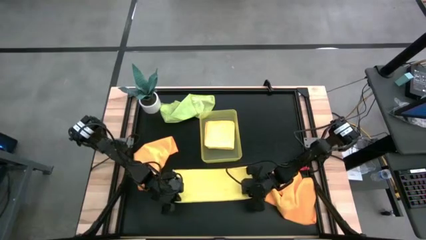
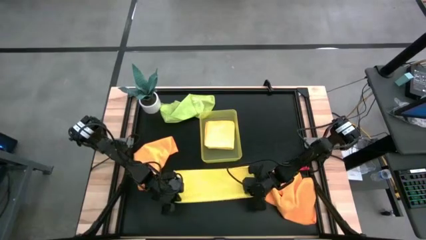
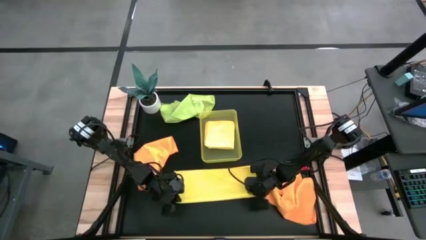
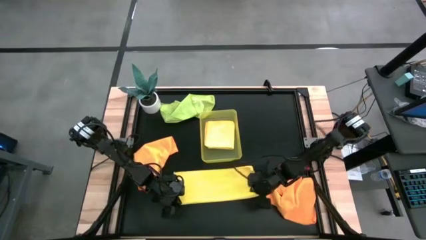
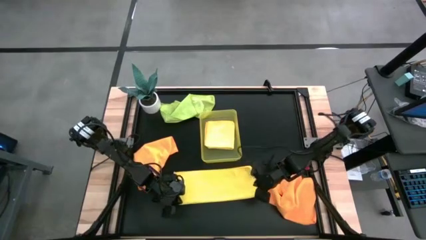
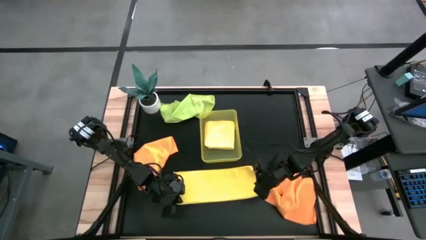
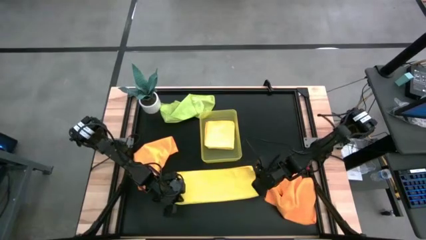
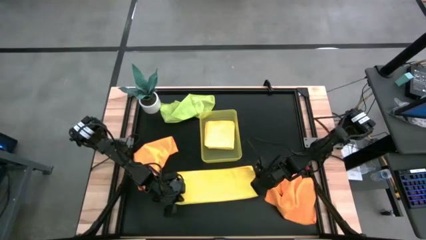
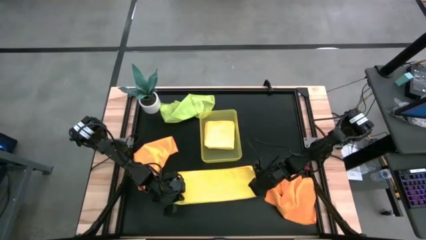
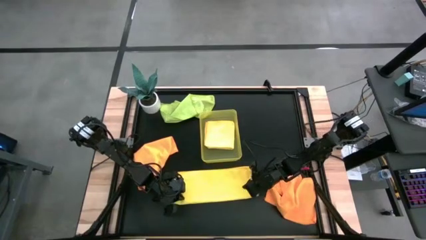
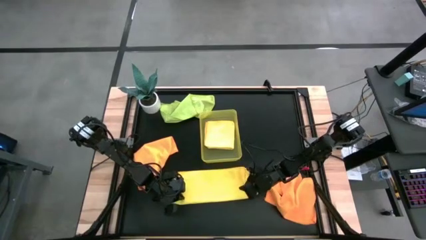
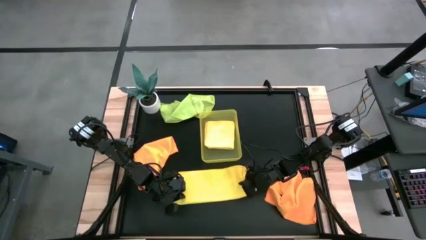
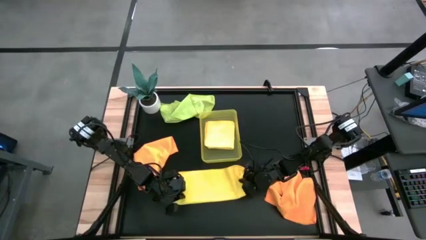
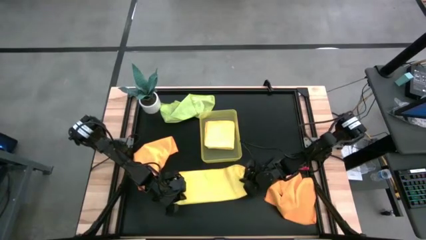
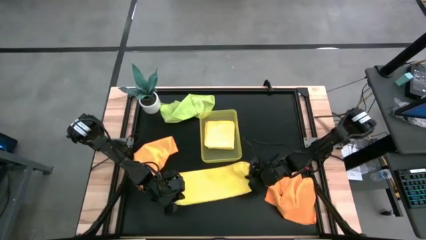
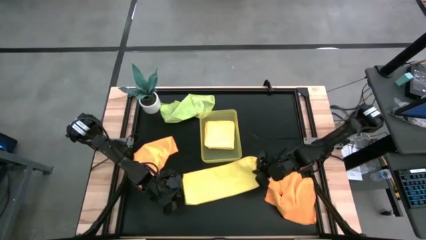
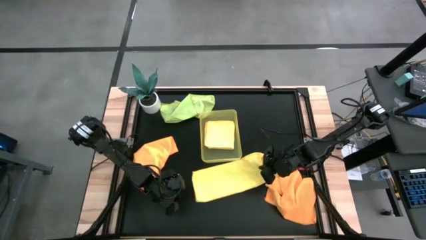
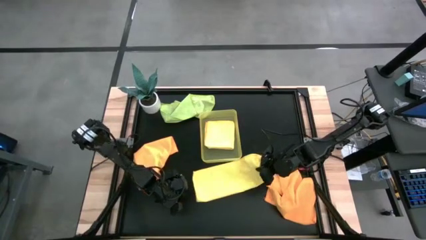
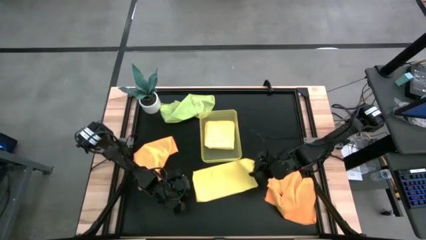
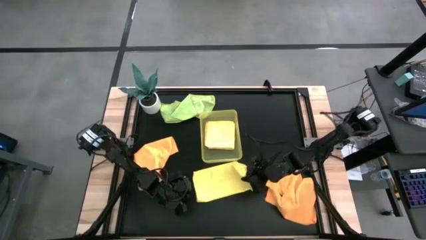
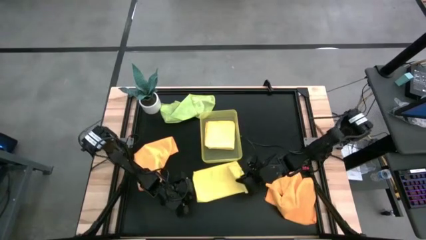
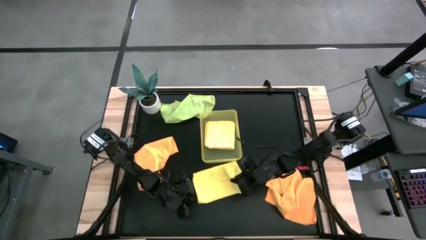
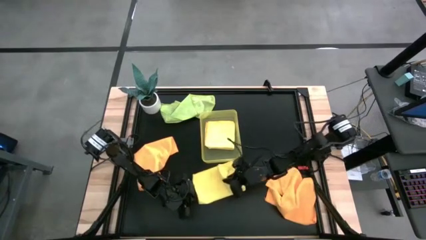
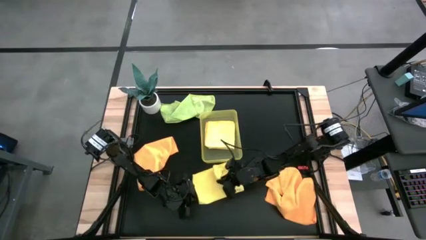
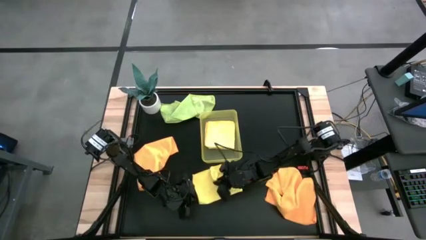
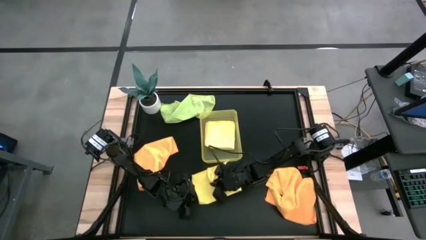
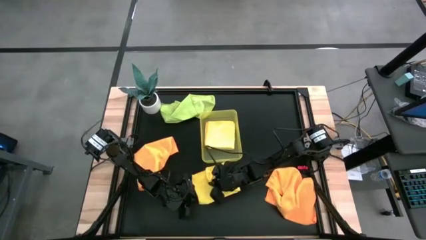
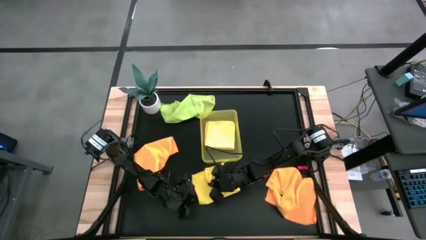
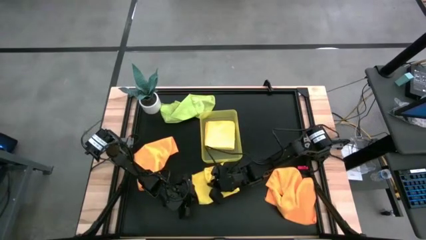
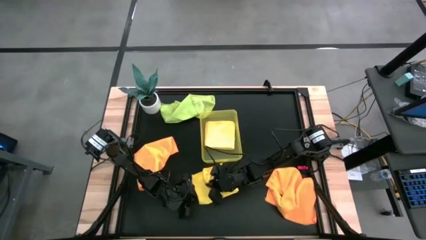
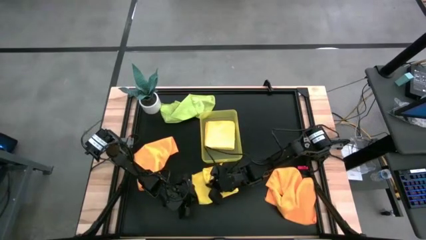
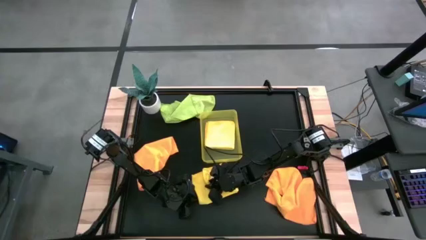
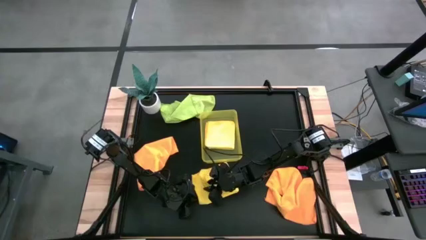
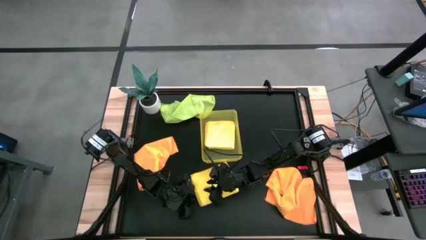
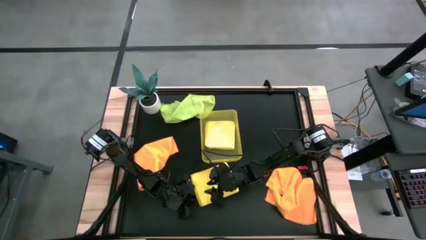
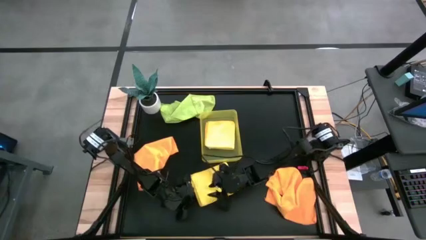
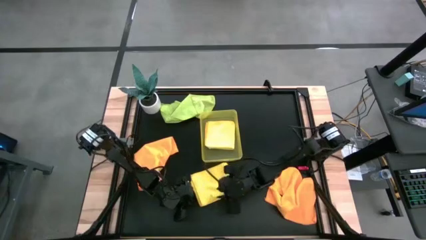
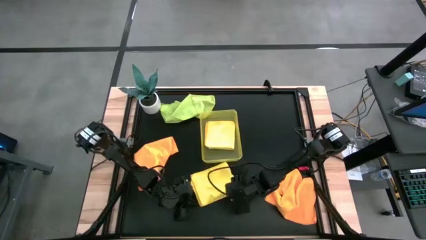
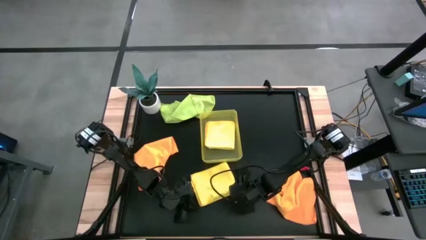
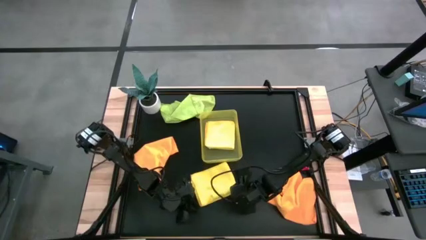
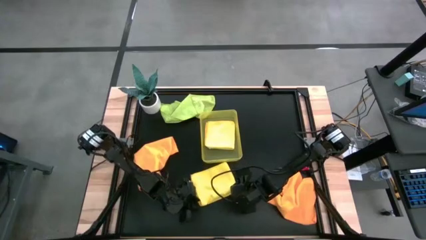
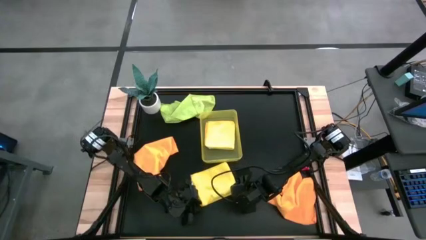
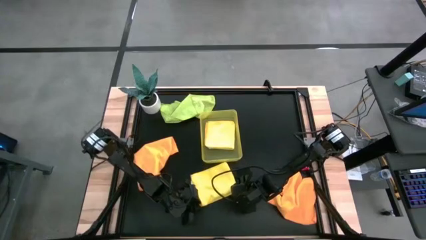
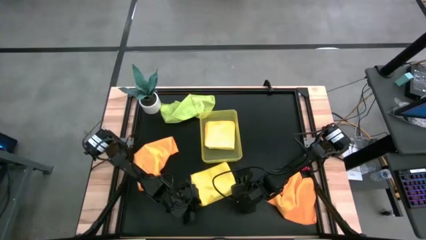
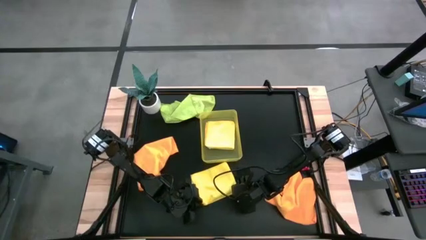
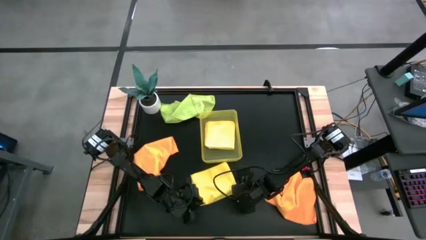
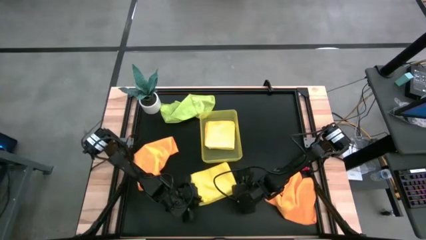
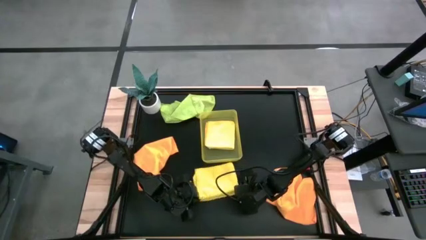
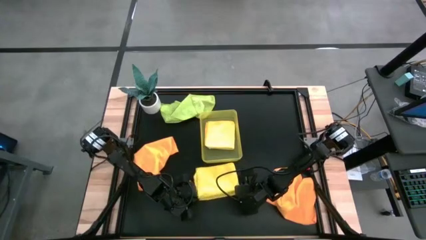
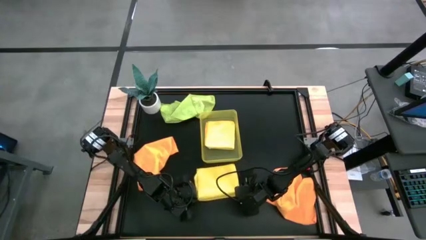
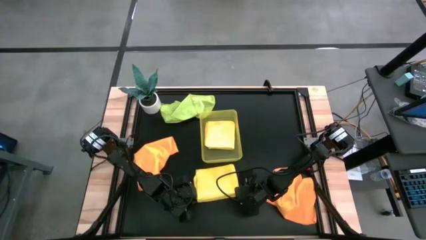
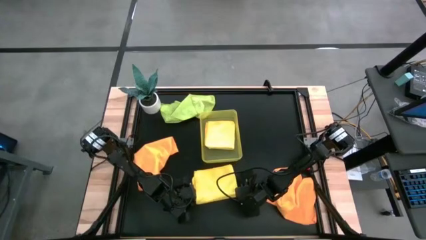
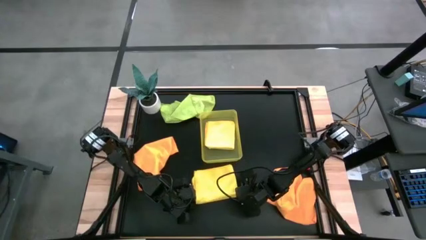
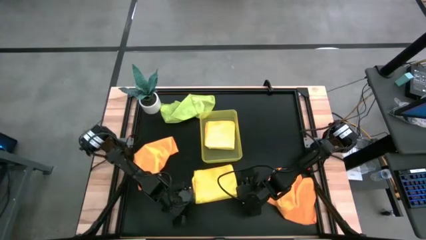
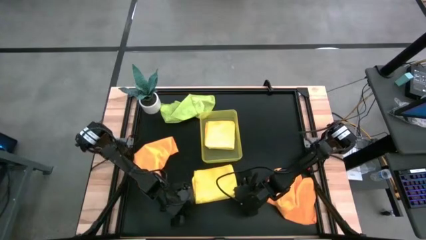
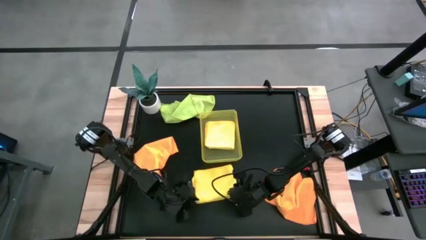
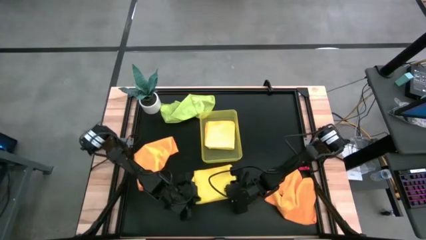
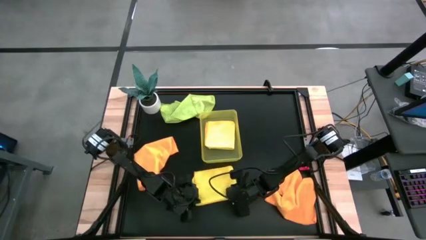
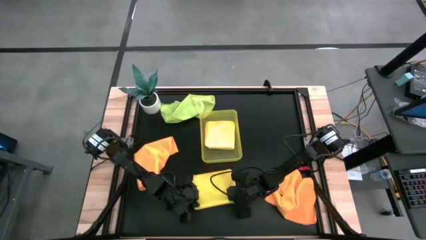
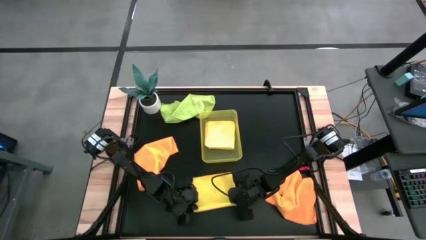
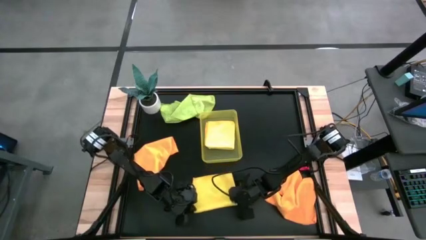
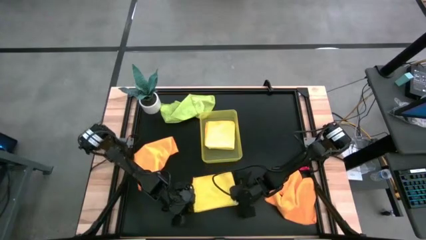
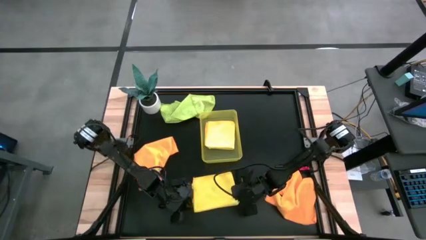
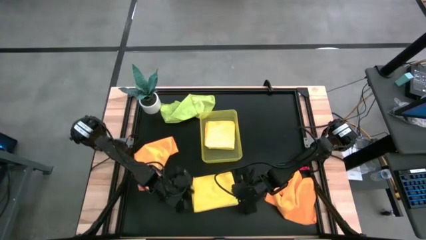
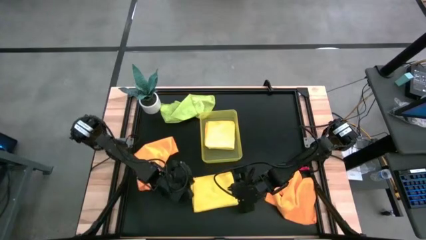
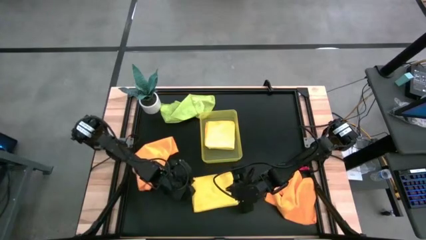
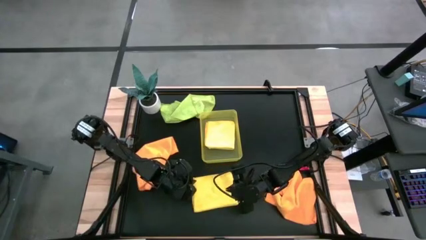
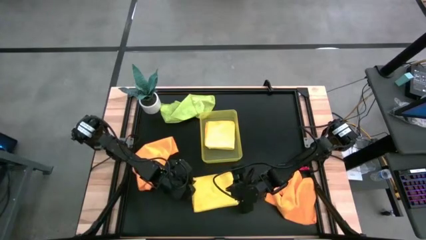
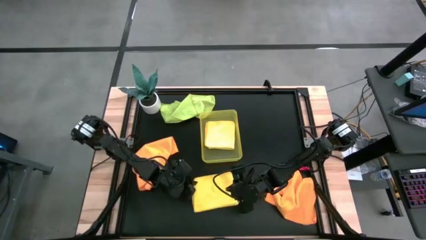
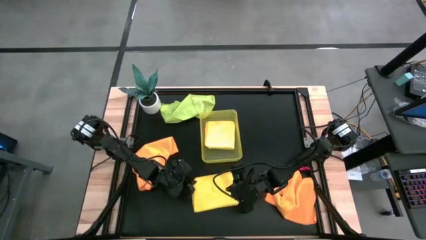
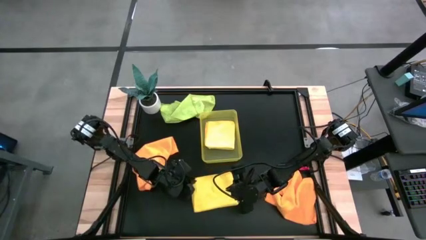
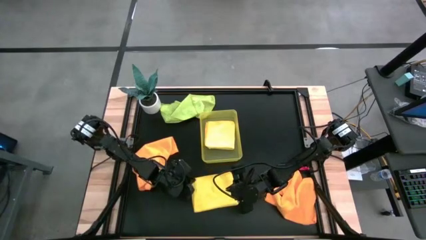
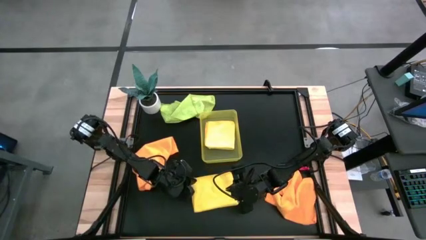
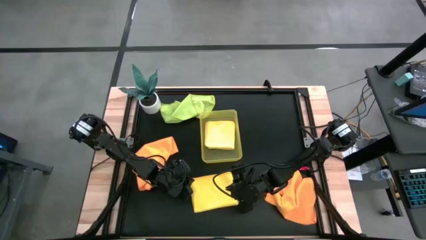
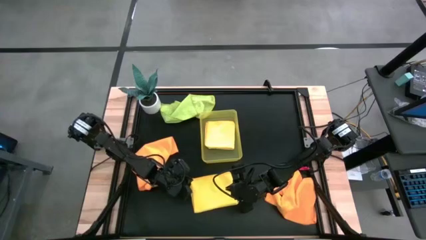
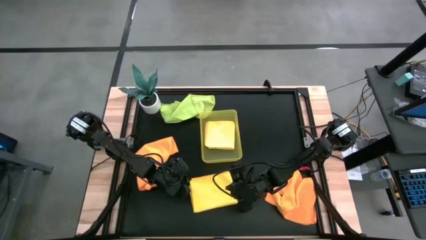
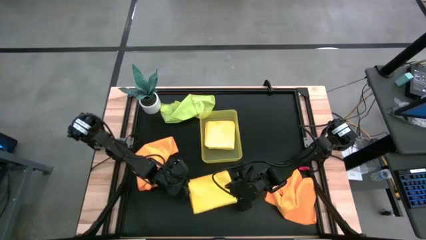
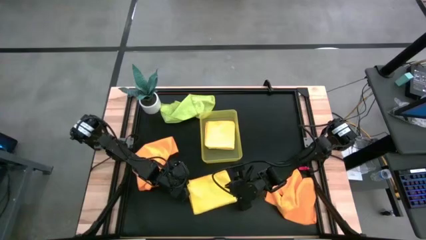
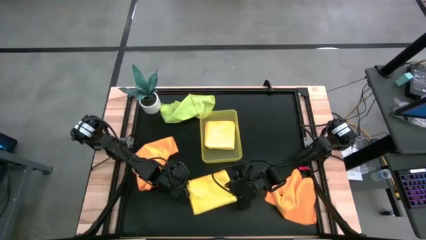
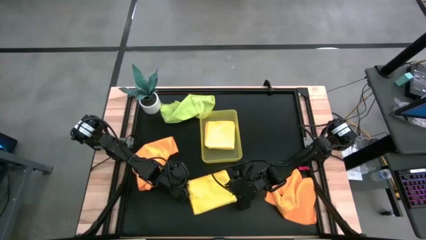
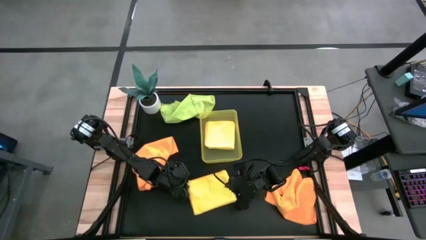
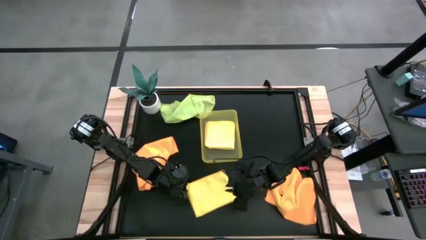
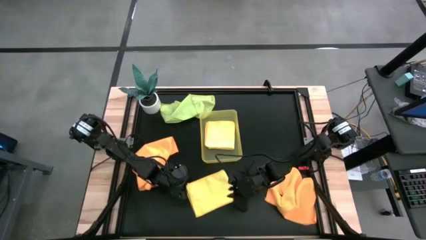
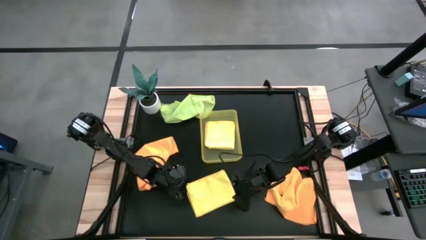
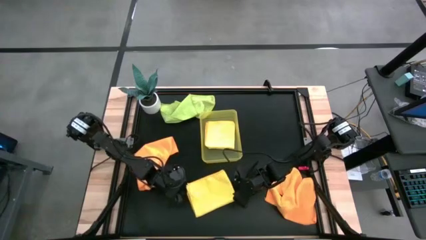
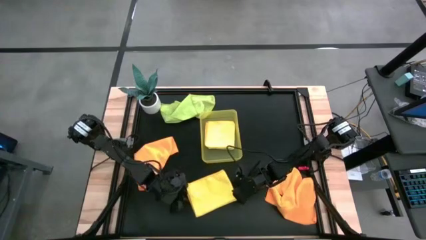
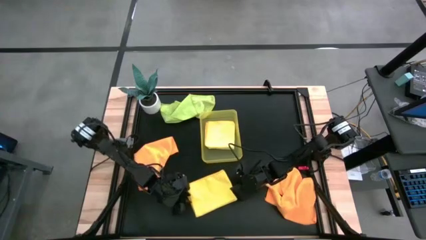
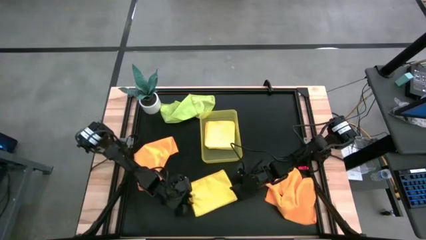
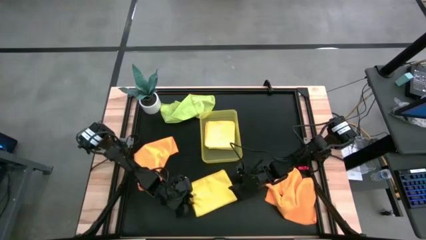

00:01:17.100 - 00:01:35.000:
Task: Fold microfiber towels
Fold the yellow microfiber cloth
